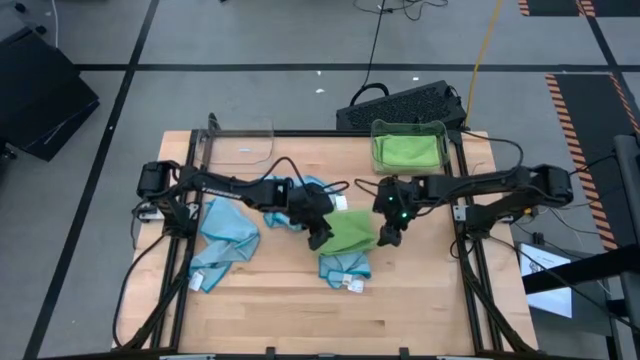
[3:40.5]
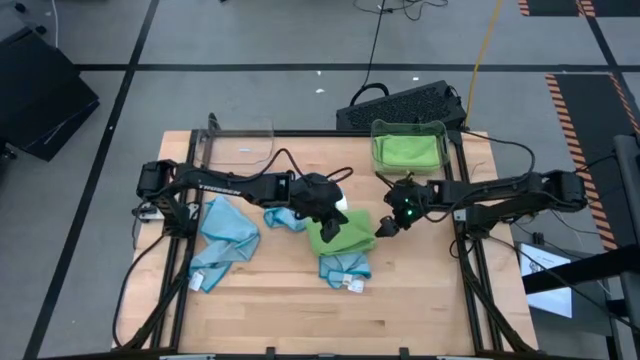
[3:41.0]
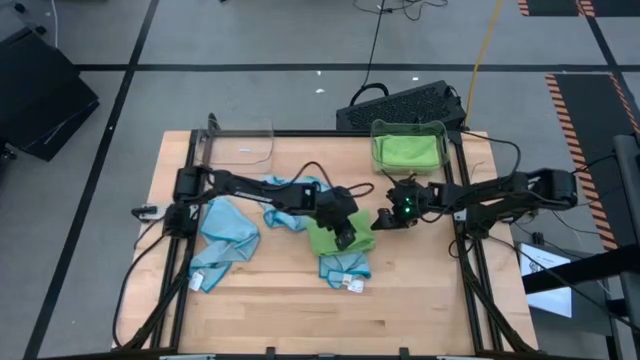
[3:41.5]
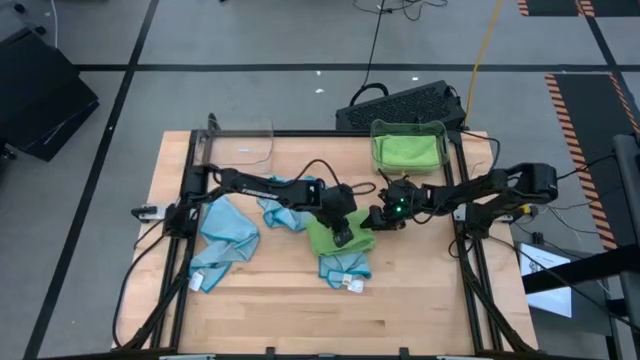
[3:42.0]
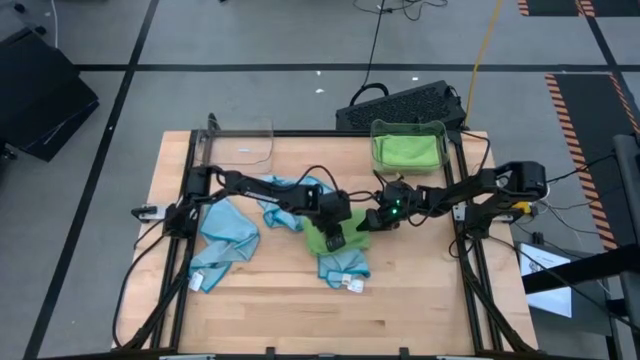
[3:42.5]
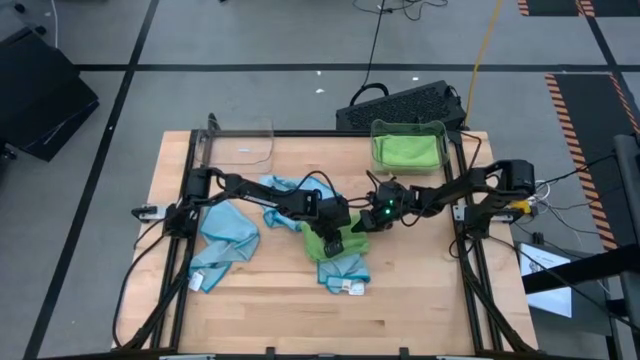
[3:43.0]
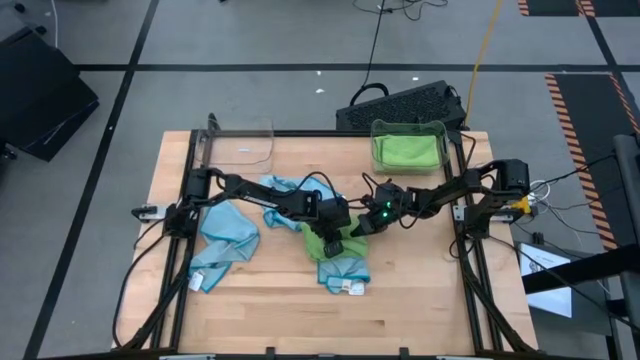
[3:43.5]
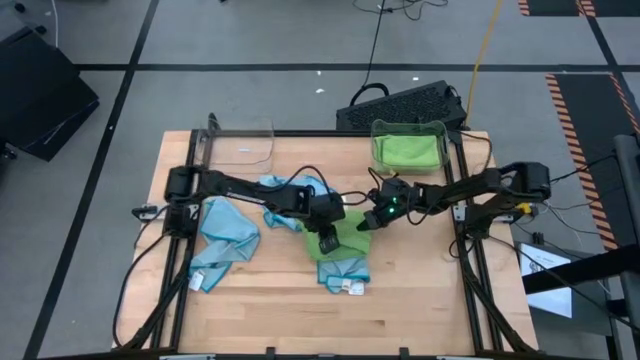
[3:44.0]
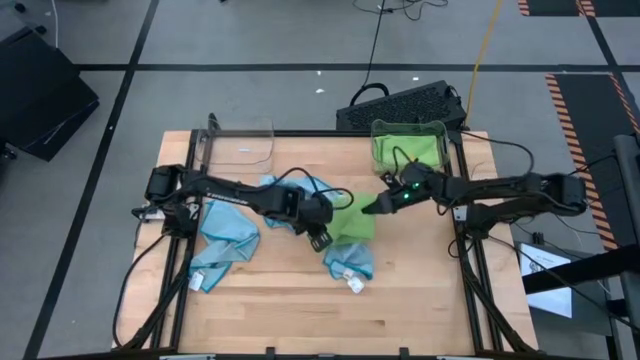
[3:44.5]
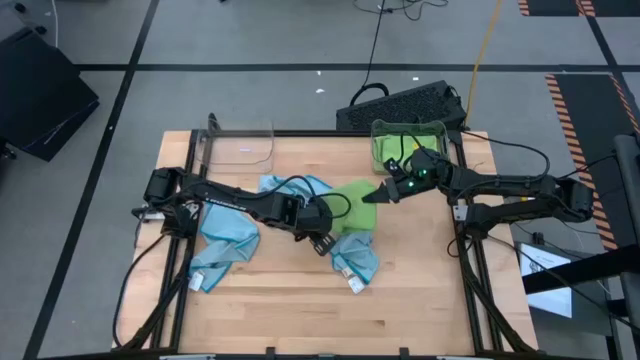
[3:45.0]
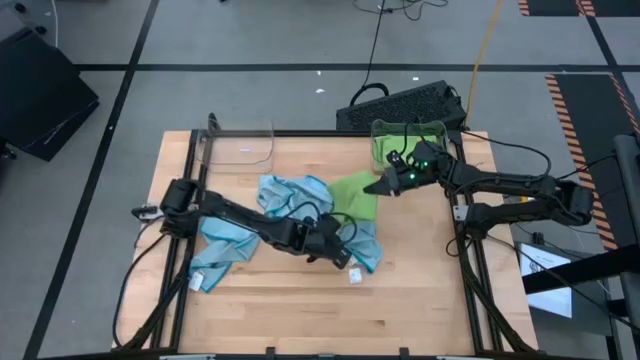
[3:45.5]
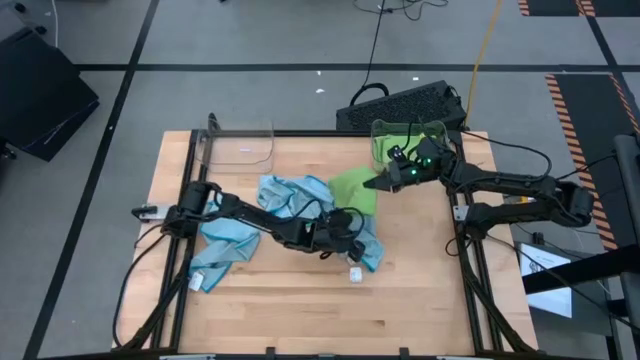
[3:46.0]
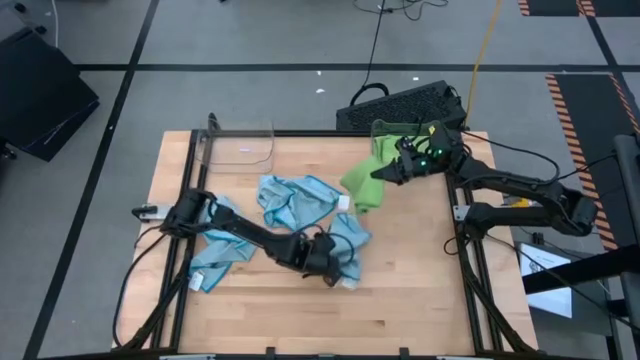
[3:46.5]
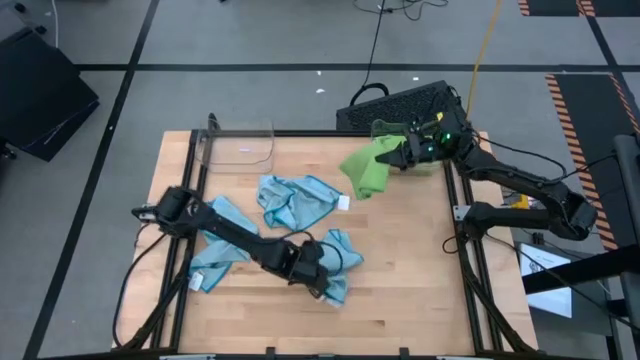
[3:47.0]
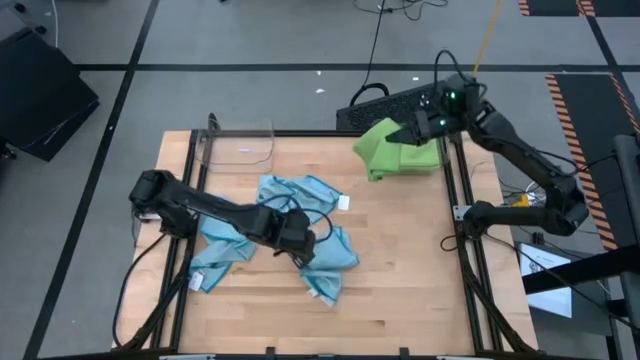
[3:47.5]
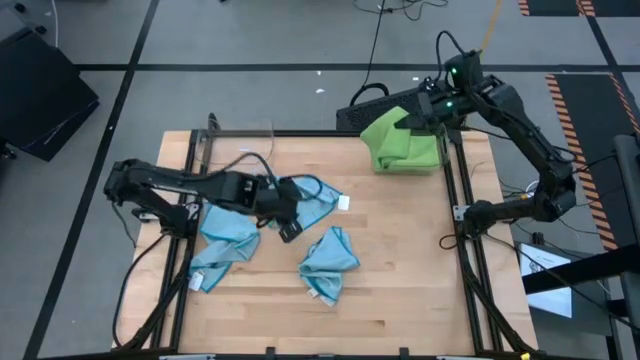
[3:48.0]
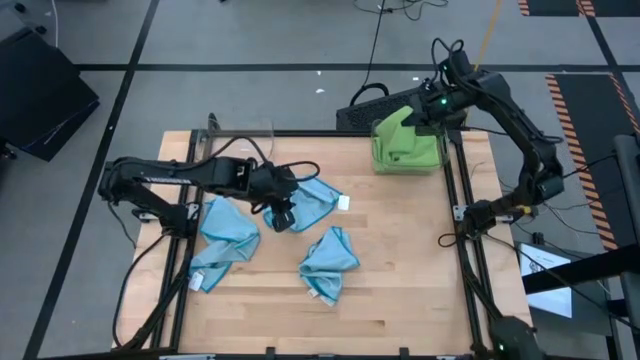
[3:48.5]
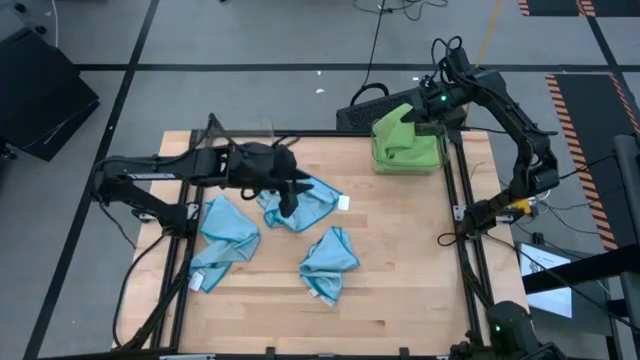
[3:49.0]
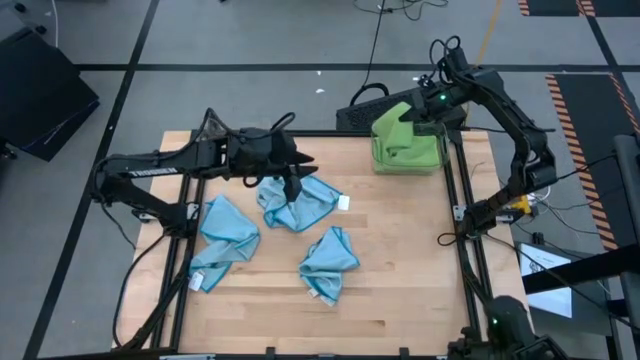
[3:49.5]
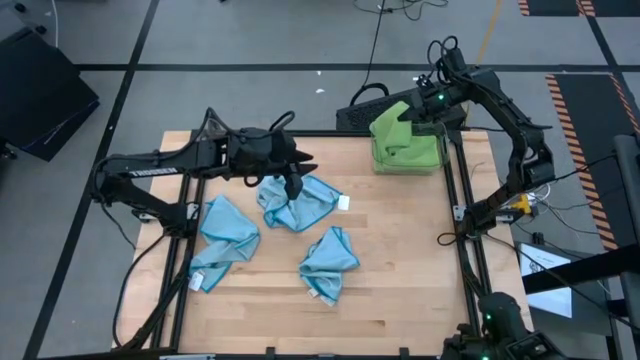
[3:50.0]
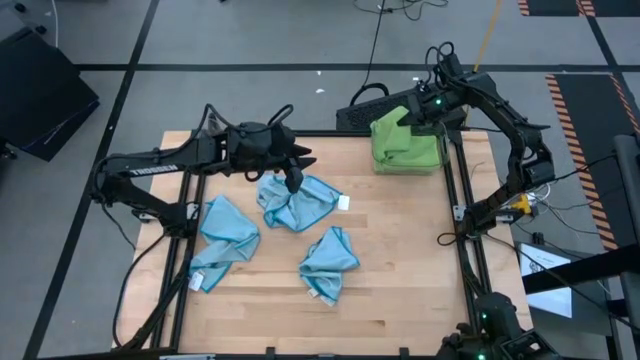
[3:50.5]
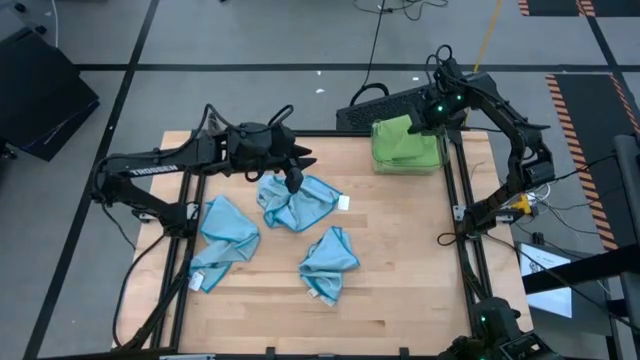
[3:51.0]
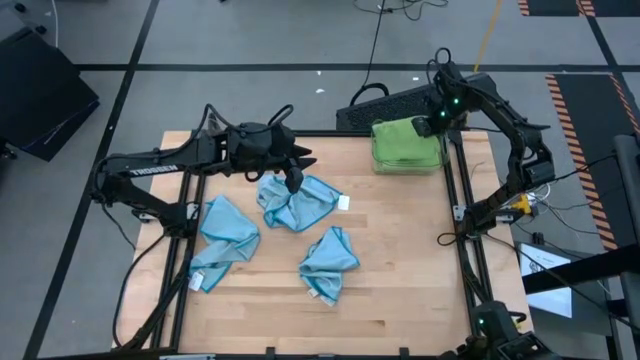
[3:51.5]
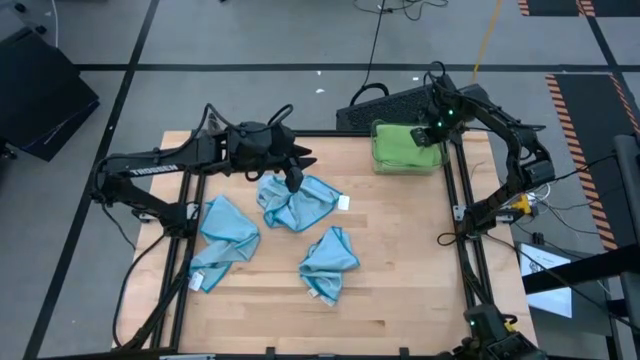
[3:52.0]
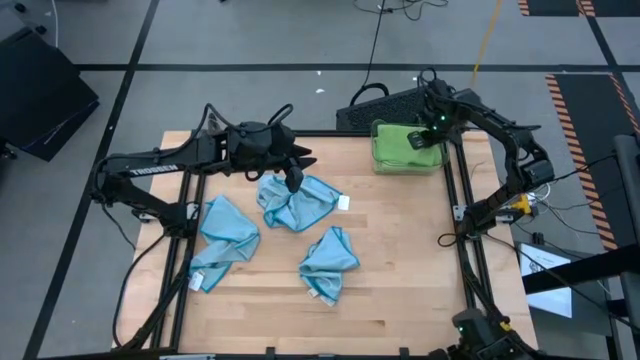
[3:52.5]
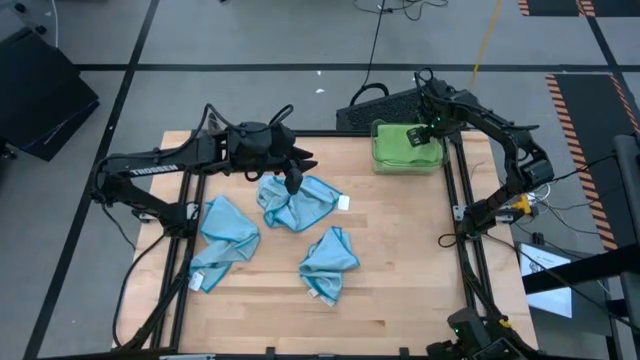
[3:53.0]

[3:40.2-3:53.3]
Task: Sort microfiber towel by color & place in baskets
Stack the green towel on top of the green towel in the right transparent bin

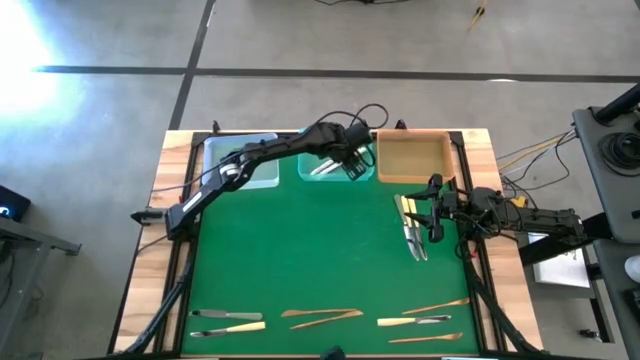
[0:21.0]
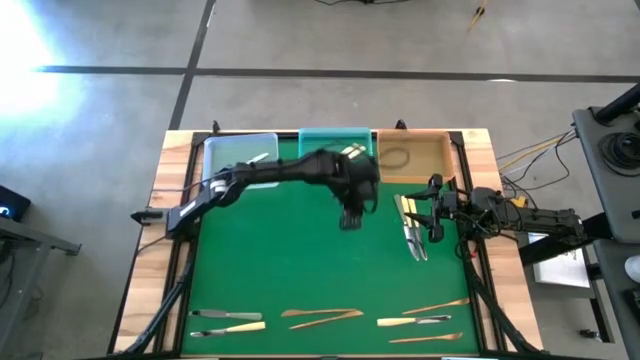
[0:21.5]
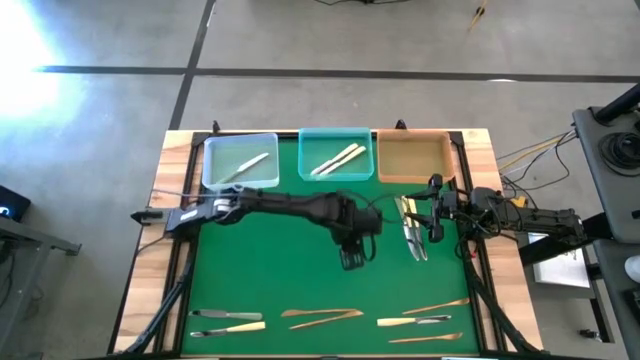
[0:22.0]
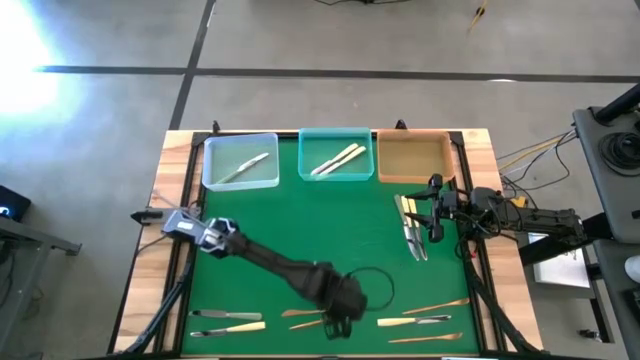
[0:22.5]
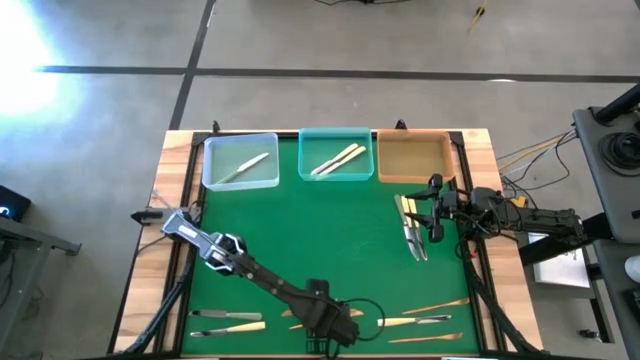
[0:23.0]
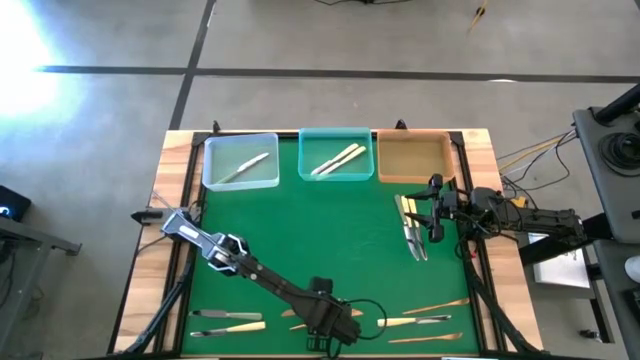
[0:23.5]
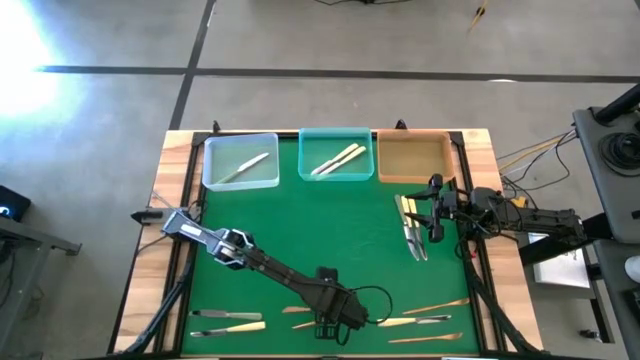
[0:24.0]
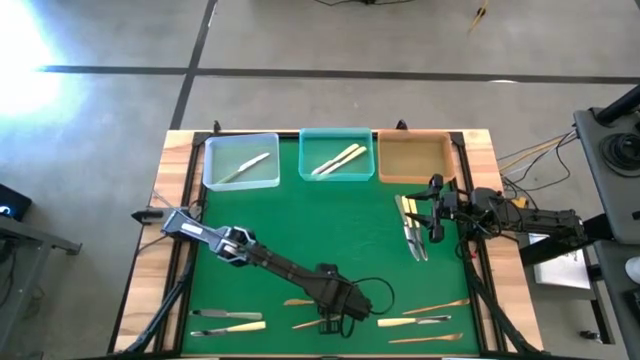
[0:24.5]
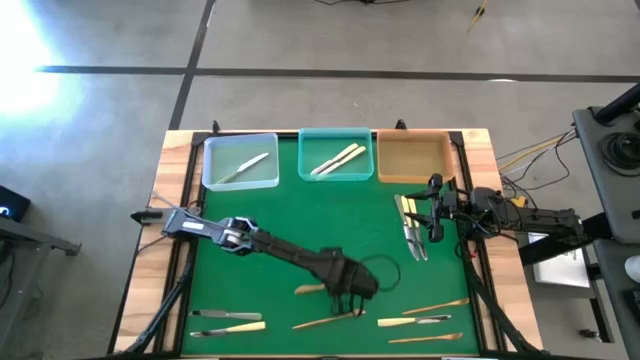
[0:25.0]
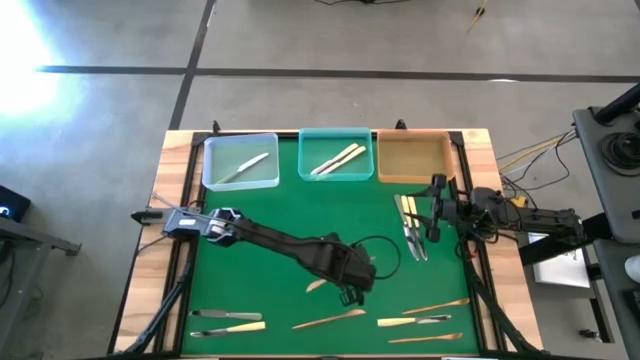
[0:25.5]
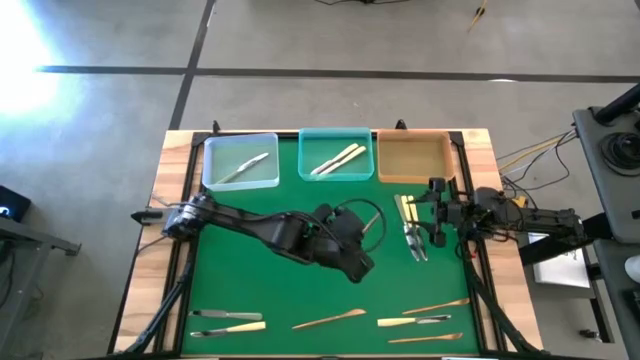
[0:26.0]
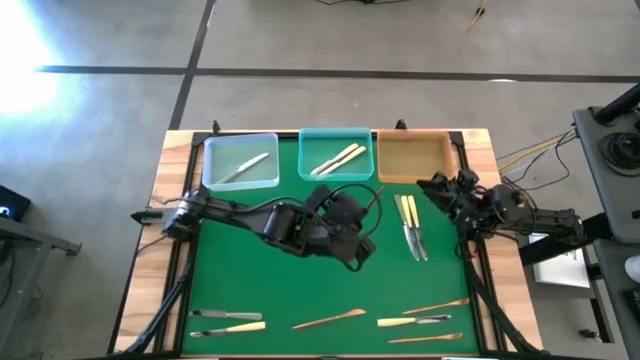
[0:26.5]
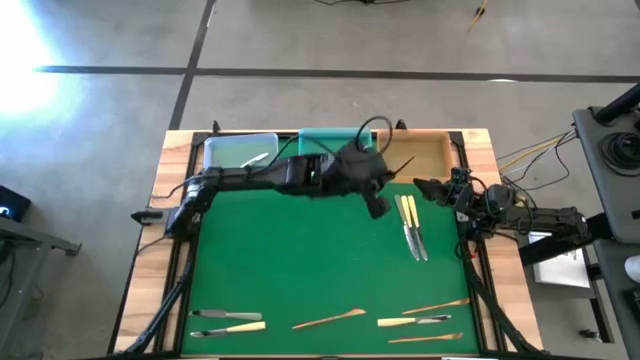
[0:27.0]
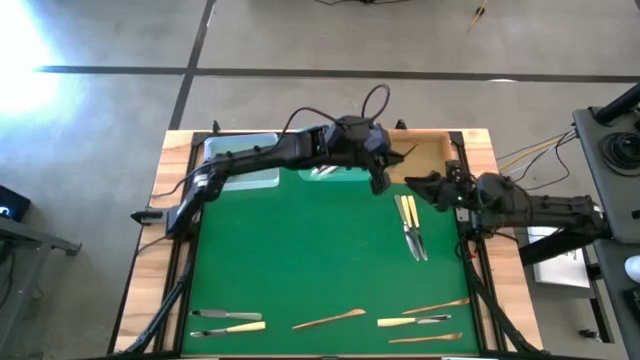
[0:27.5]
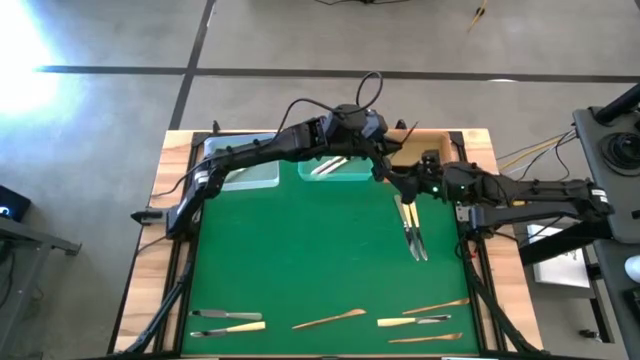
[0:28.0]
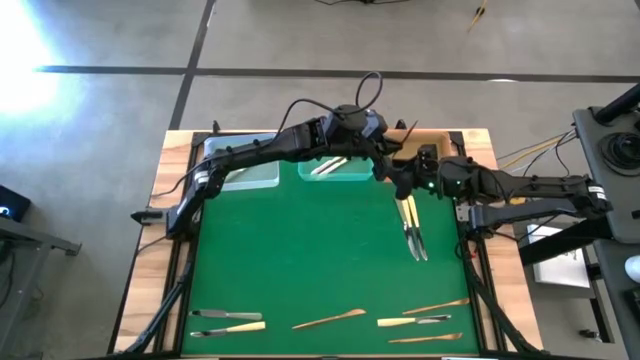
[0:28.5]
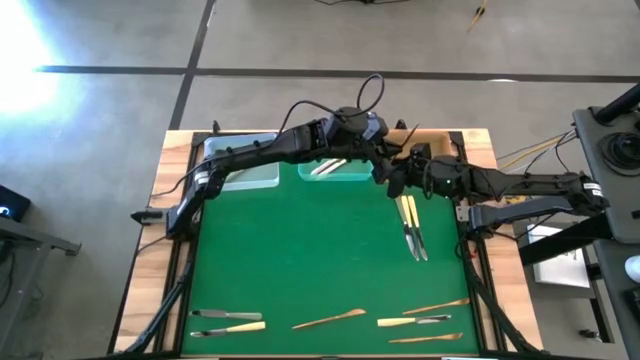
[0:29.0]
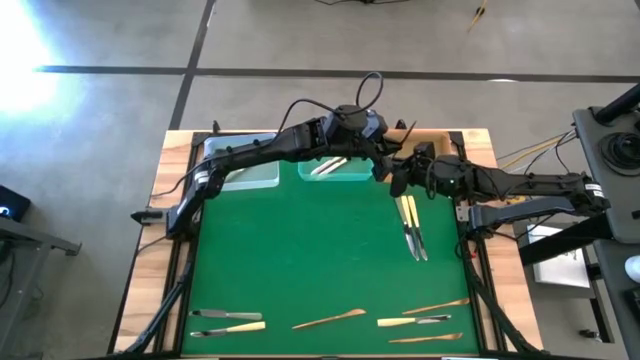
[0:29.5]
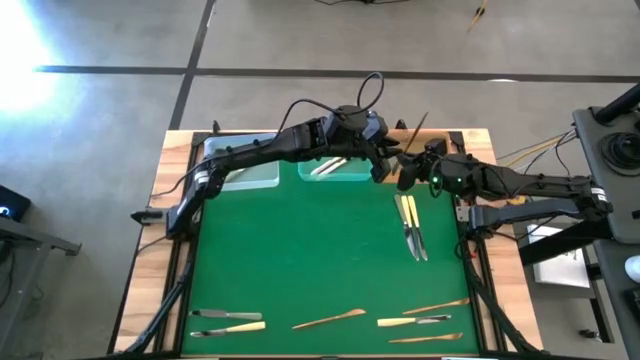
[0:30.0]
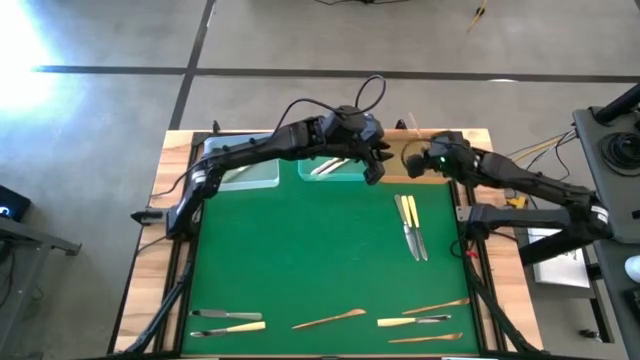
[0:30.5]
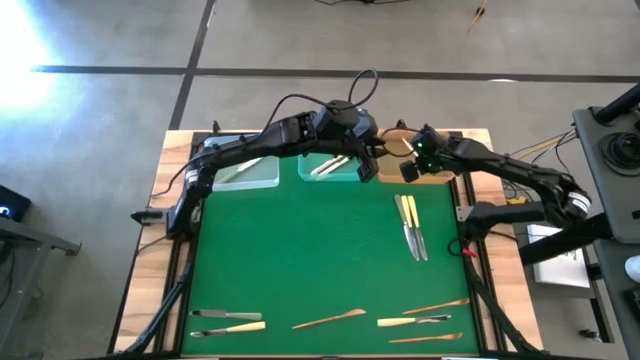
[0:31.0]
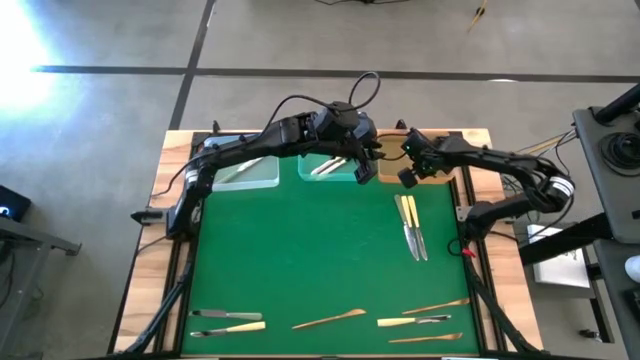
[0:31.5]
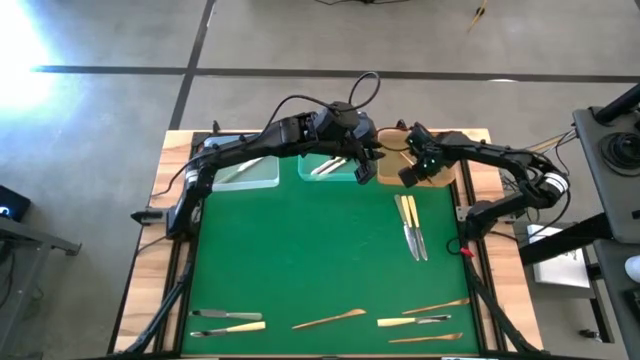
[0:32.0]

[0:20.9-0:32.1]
Task: Sort silverware by color (type)
Put the top left gold knife into the yellow bin
